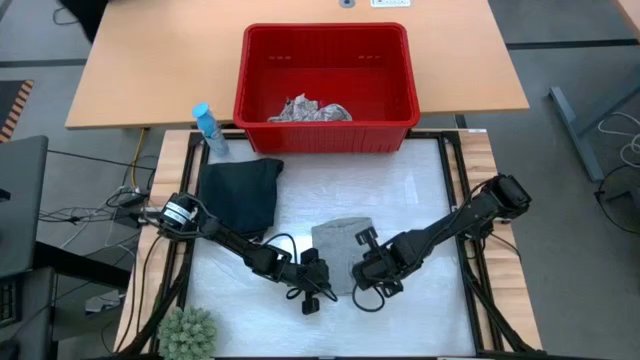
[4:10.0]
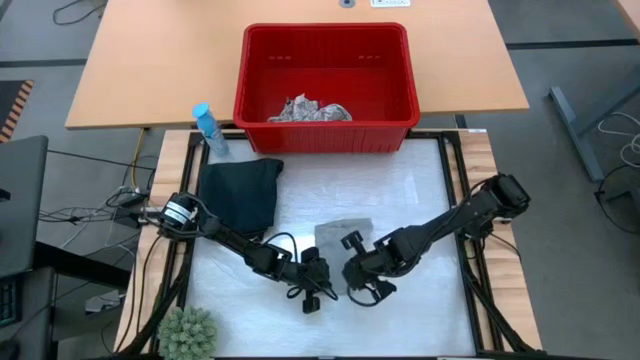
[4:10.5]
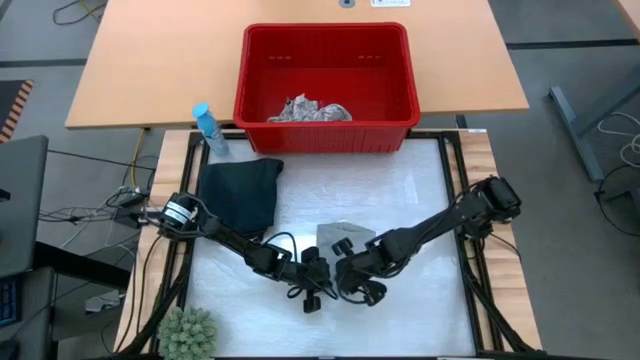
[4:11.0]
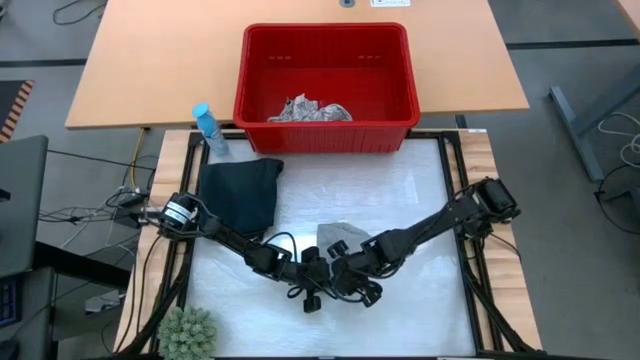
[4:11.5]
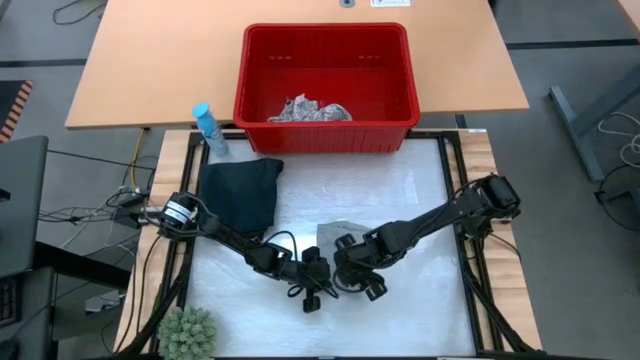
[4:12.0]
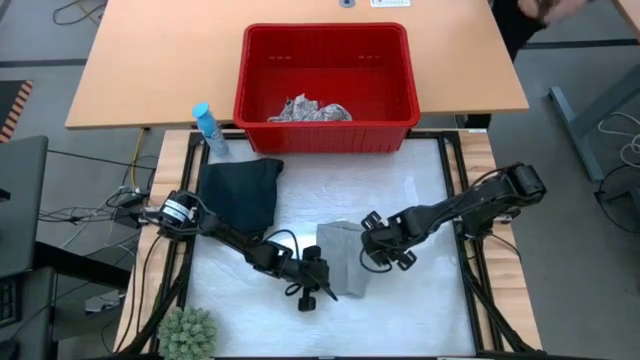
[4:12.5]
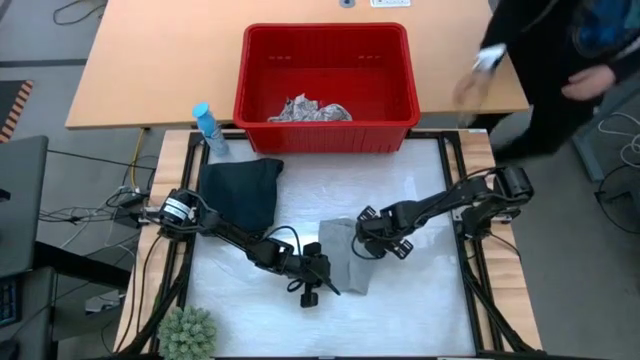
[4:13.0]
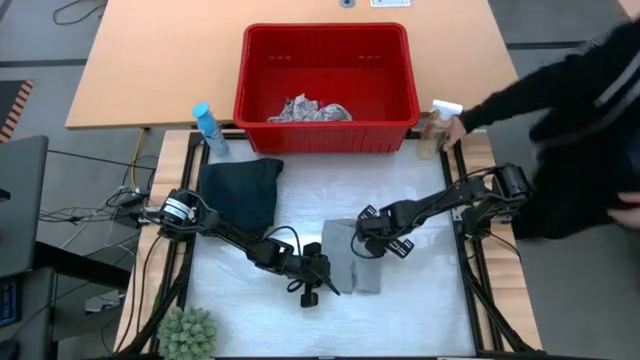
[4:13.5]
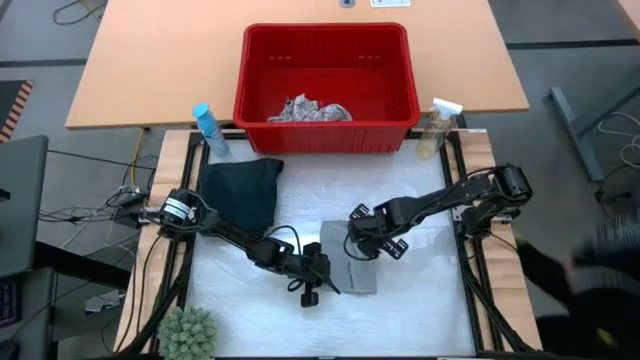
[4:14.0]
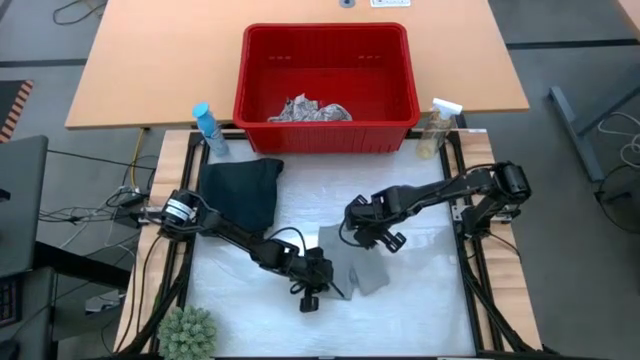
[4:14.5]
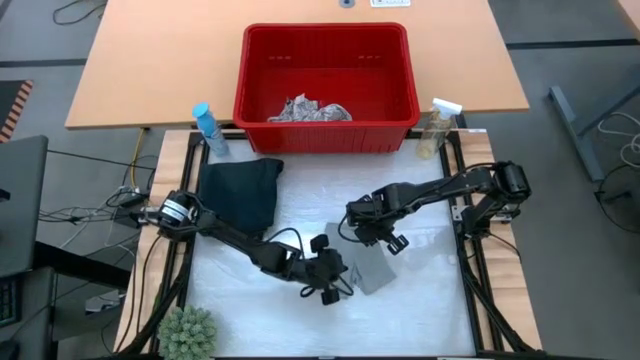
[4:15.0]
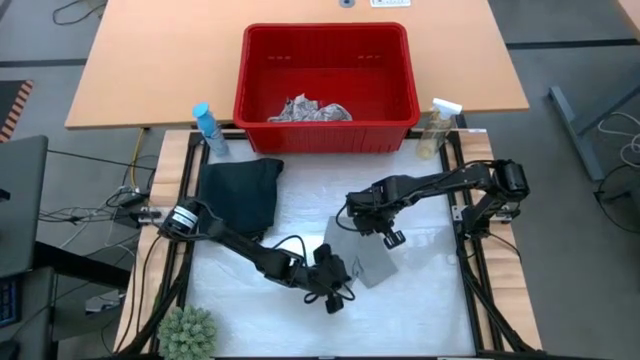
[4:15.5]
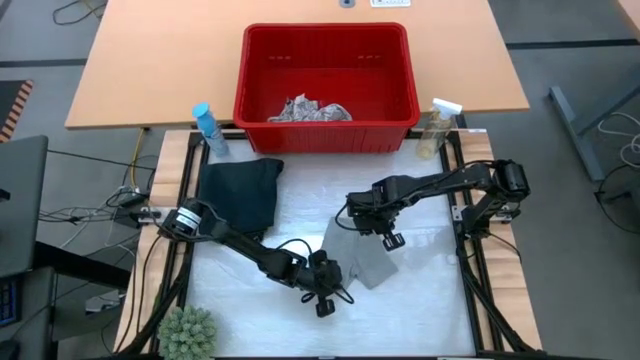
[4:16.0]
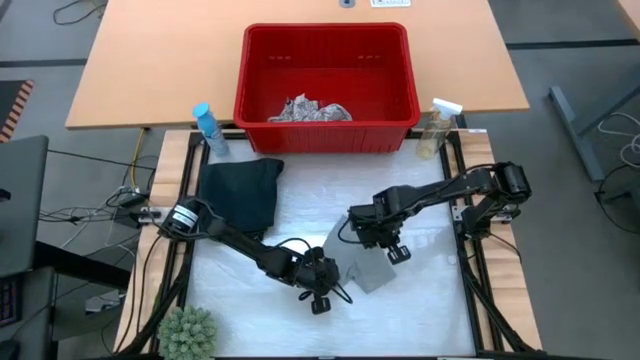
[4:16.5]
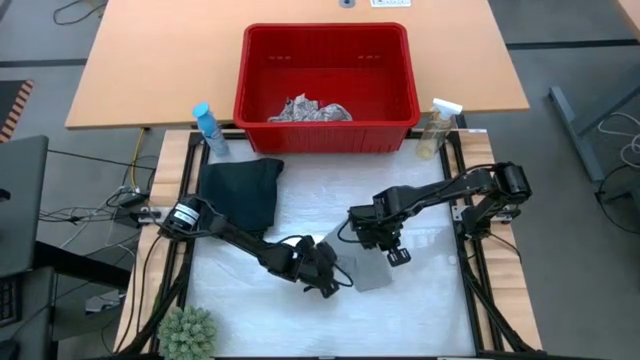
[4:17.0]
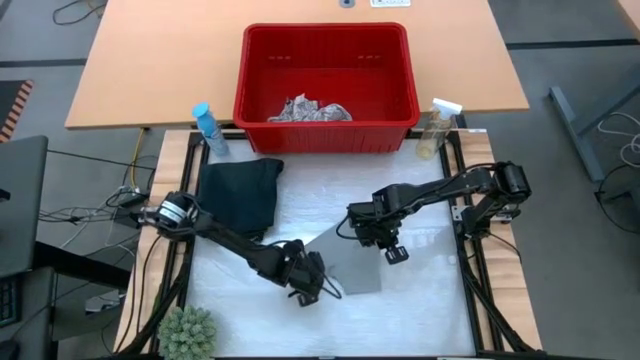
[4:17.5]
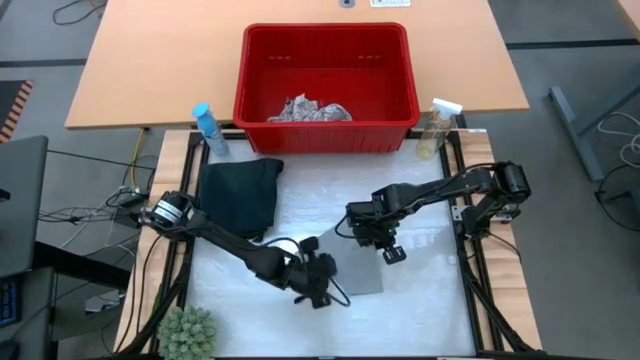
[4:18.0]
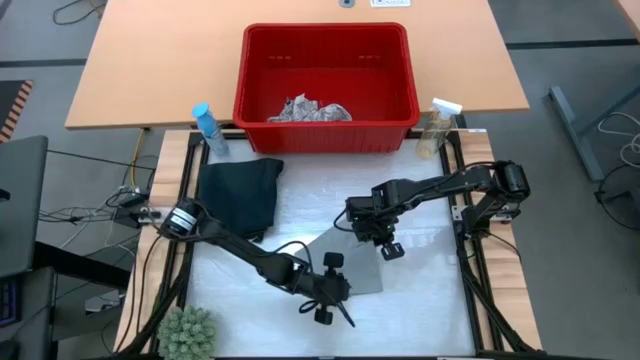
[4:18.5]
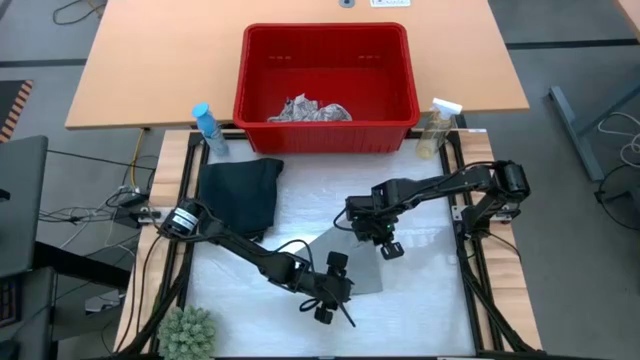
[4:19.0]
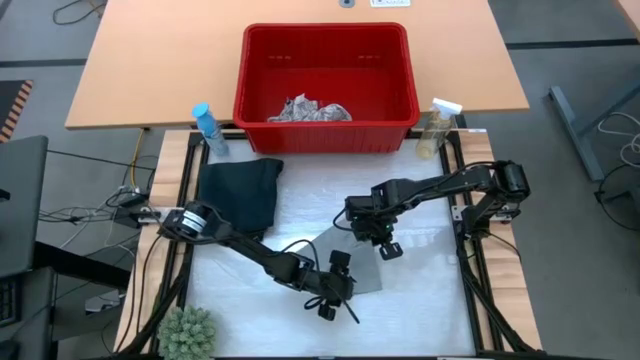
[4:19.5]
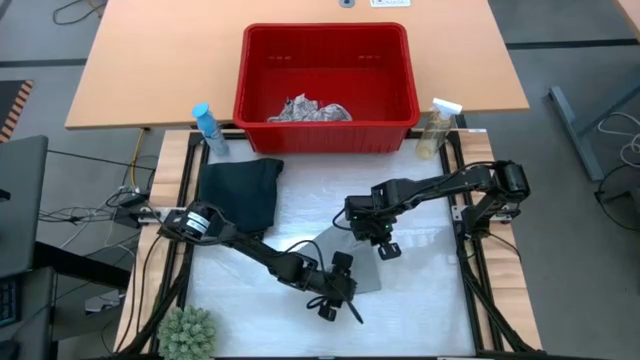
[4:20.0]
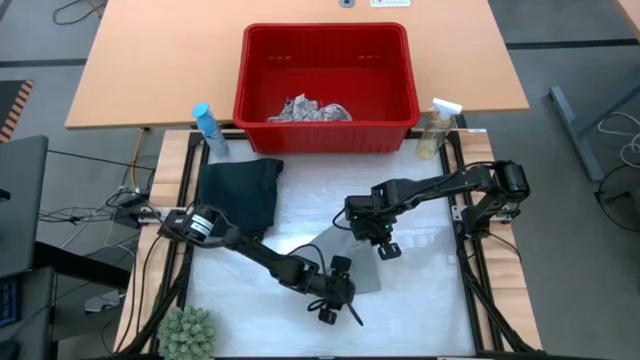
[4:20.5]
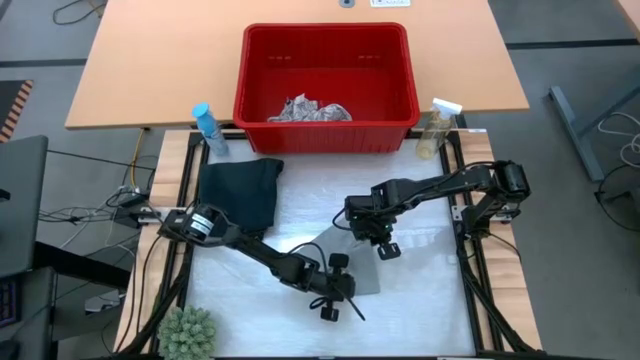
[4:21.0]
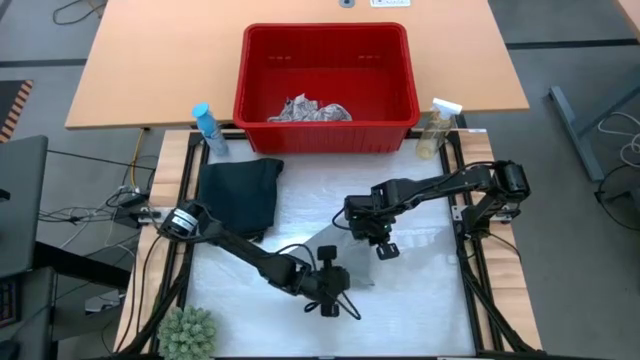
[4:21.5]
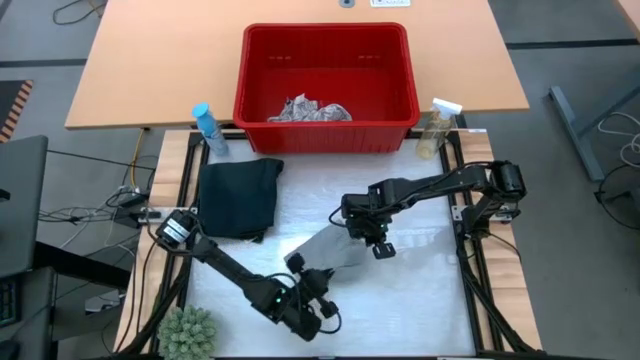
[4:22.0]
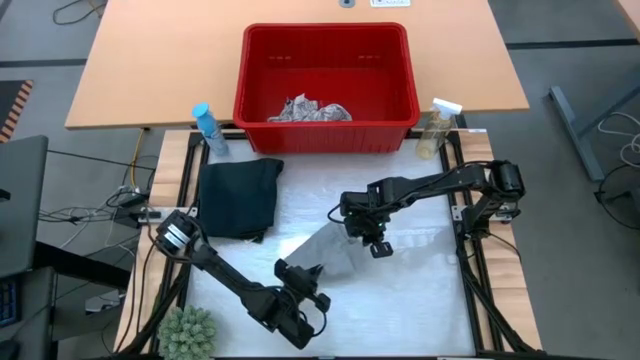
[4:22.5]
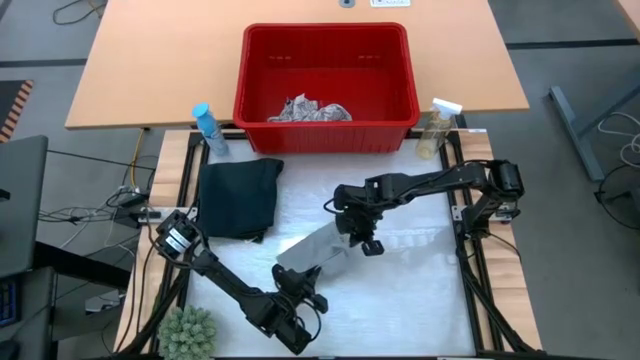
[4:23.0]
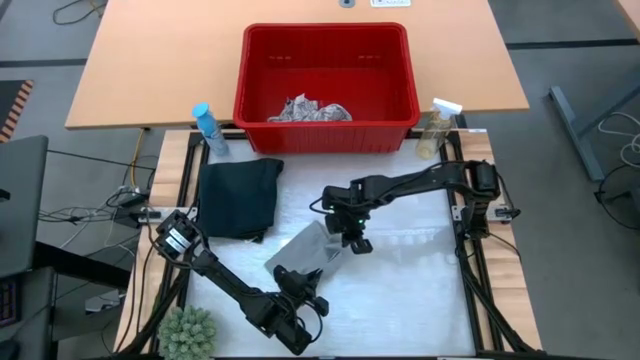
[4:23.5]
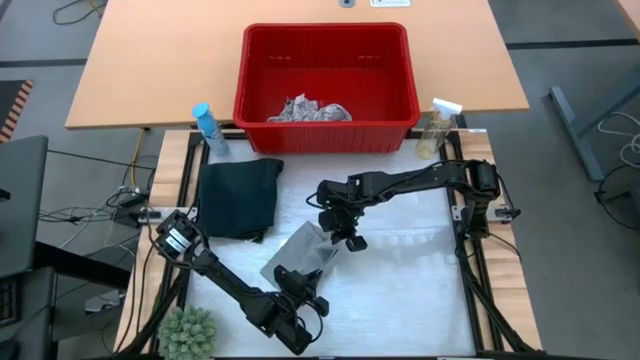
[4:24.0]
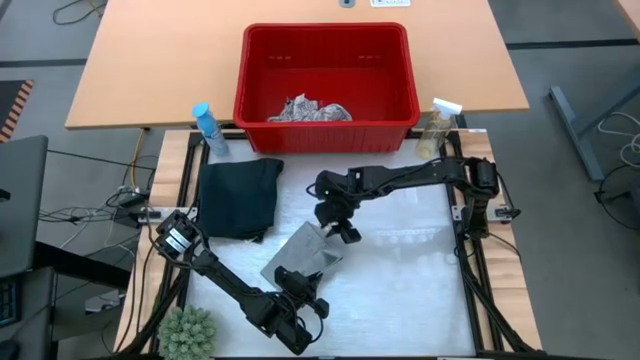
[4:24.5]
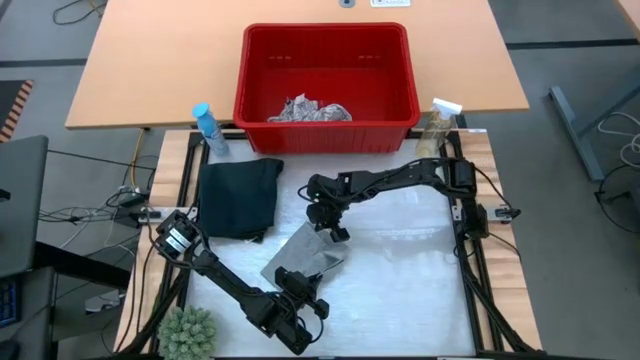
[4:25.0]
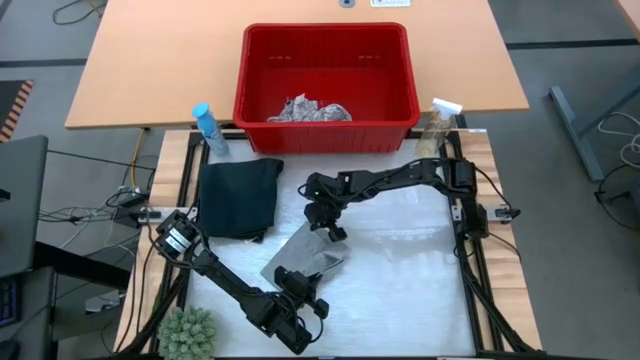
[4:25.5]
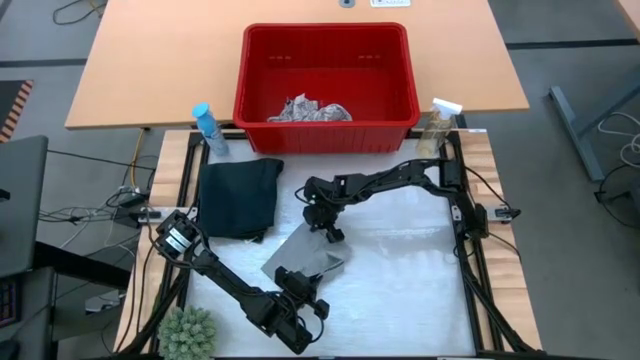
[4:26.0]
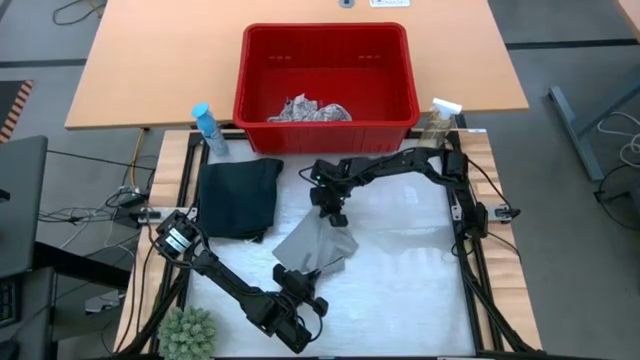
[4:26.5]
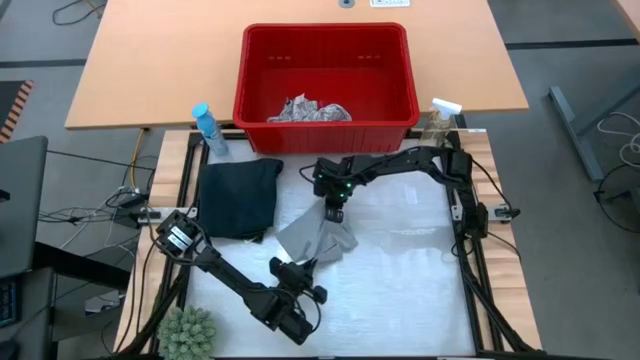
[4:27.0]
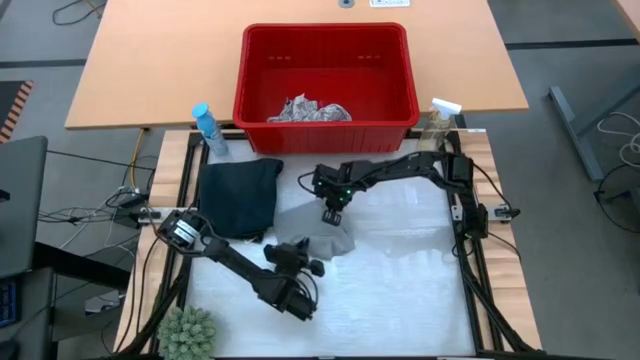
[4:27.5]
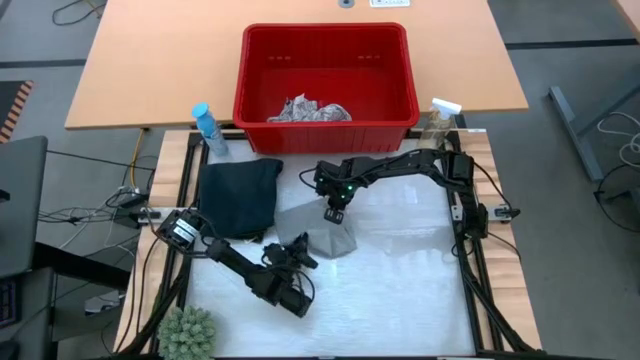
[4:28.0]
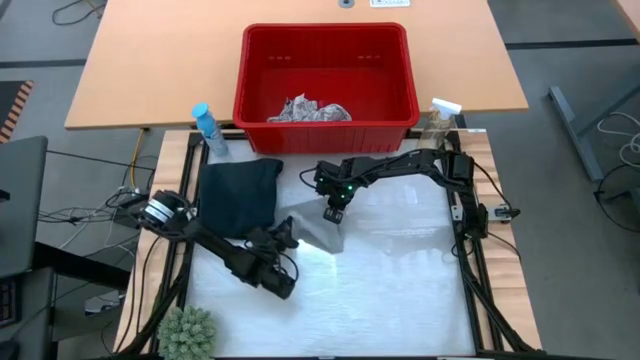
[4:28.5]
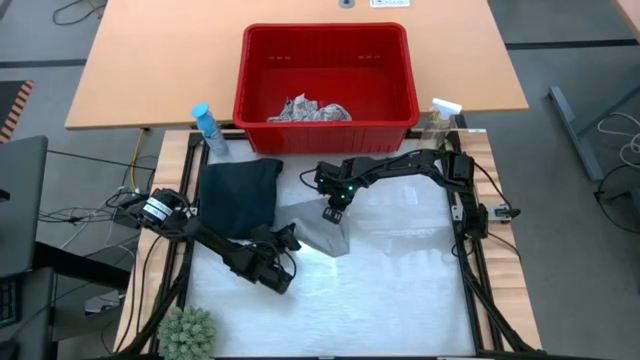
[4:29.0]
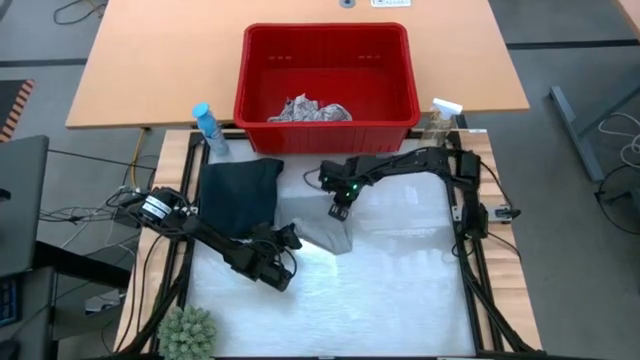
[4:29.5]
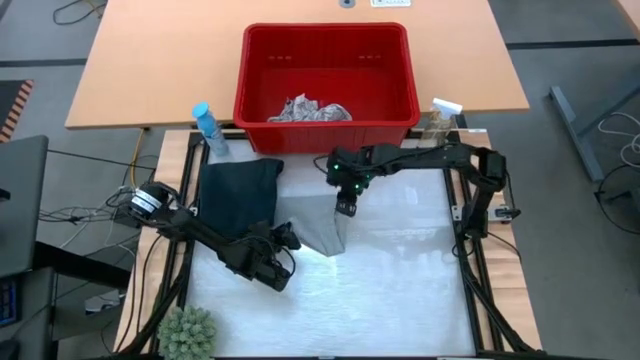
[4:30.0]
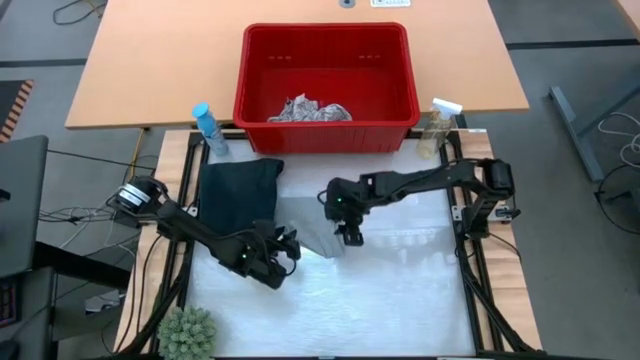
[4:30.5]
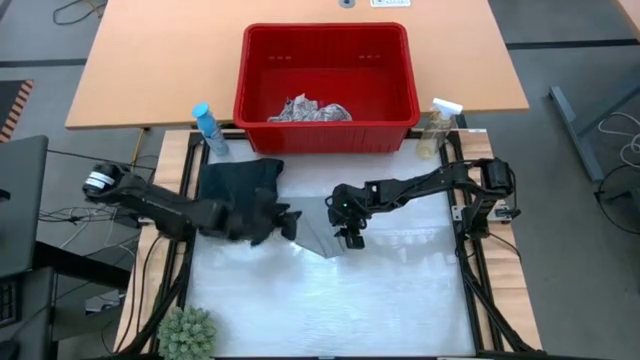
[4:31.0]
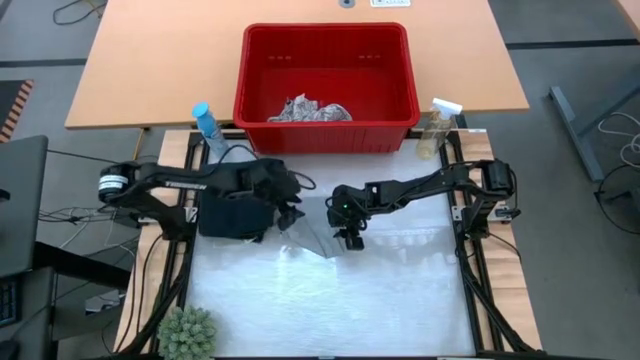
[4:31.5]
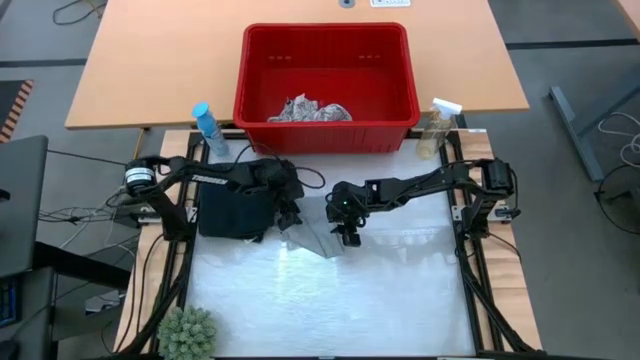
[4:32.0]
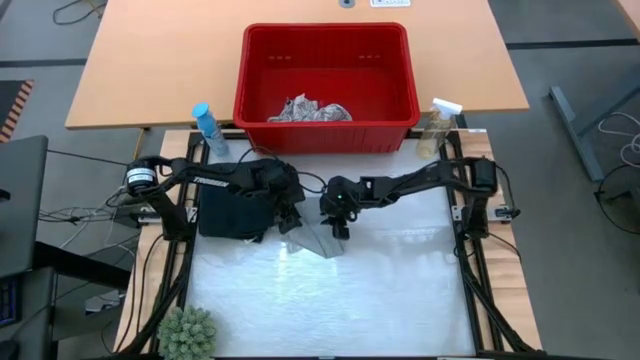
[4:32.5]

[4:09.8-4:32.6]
Task: Fold Laundry from Bin
Fold the gray shorts
